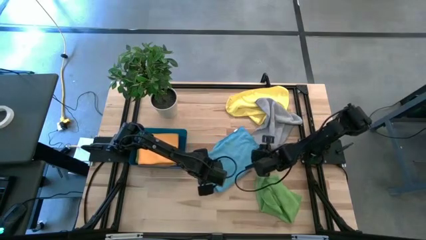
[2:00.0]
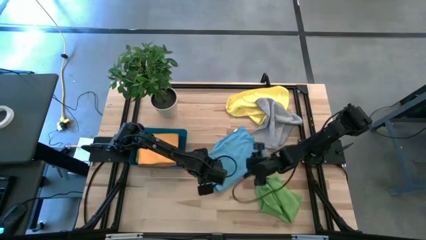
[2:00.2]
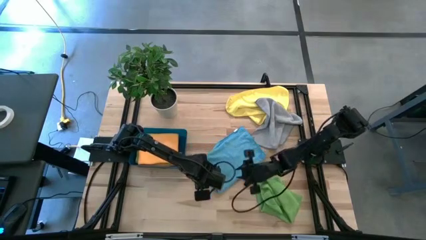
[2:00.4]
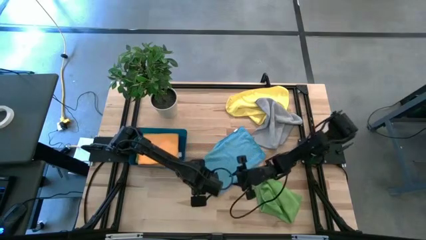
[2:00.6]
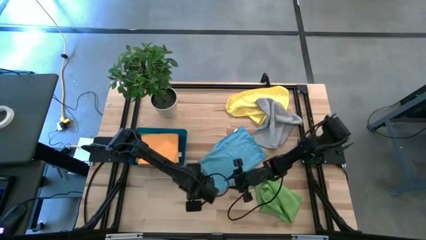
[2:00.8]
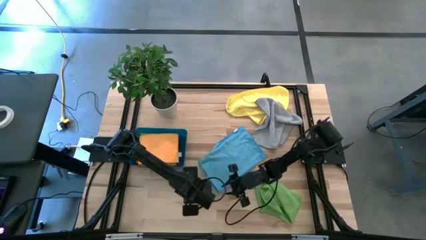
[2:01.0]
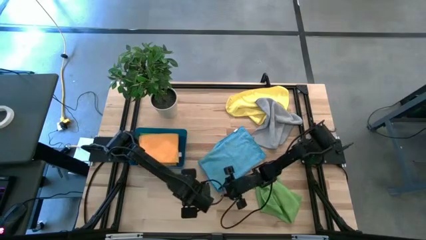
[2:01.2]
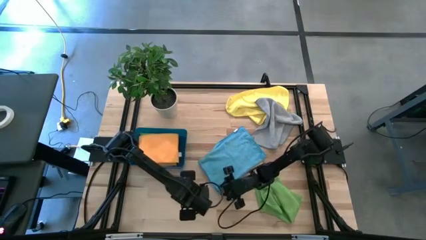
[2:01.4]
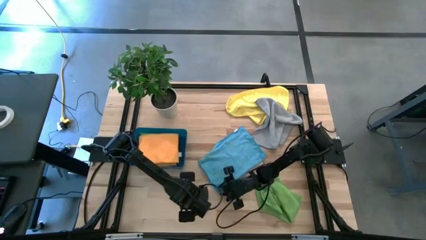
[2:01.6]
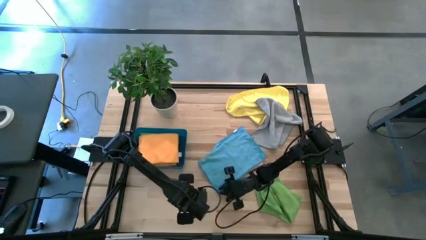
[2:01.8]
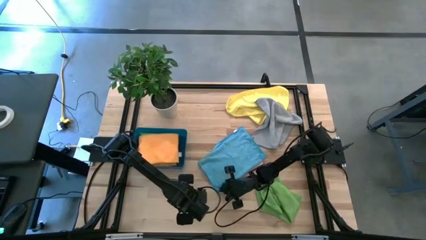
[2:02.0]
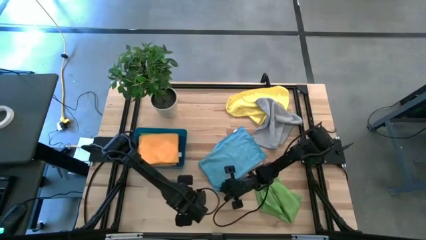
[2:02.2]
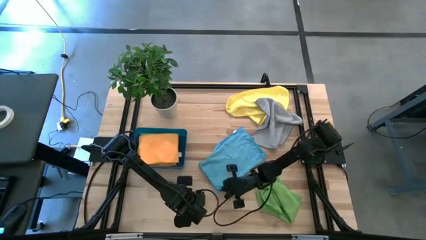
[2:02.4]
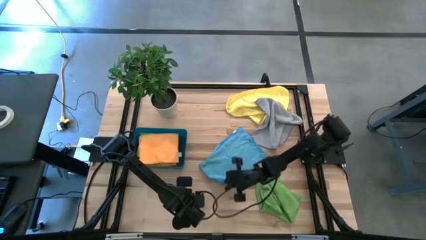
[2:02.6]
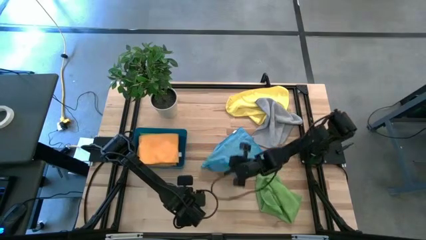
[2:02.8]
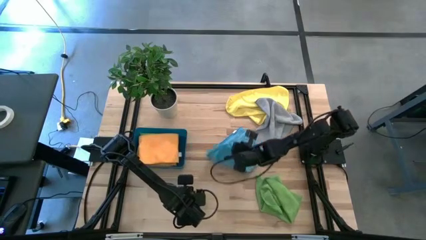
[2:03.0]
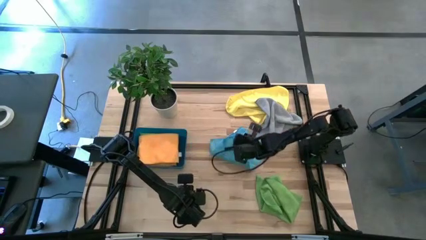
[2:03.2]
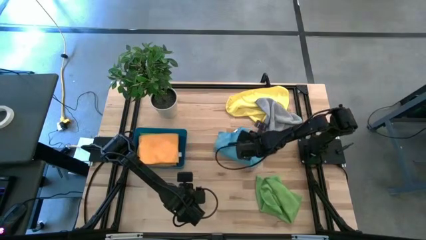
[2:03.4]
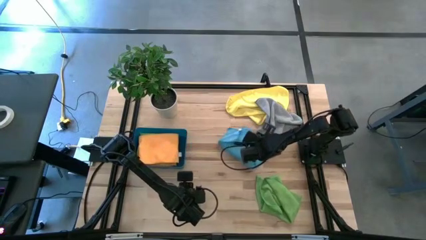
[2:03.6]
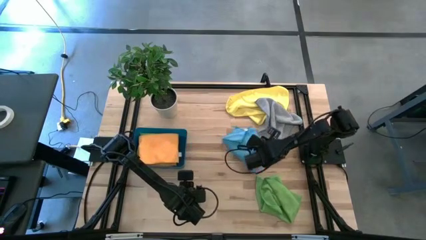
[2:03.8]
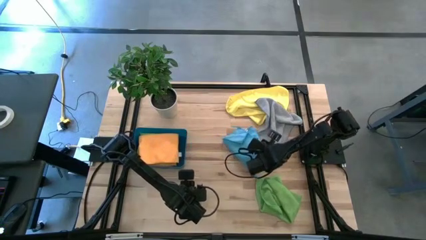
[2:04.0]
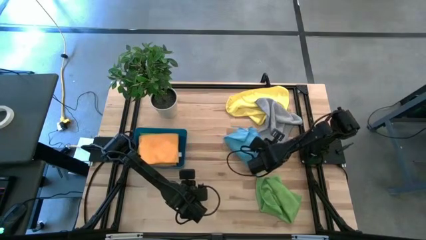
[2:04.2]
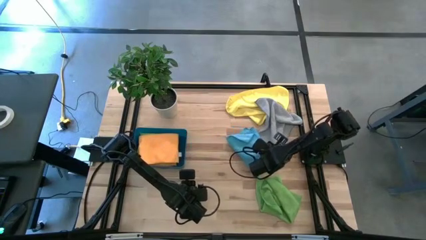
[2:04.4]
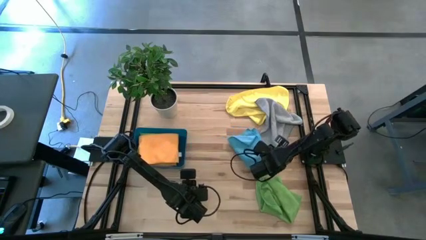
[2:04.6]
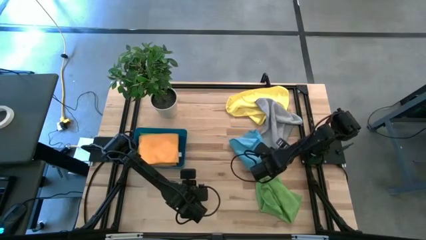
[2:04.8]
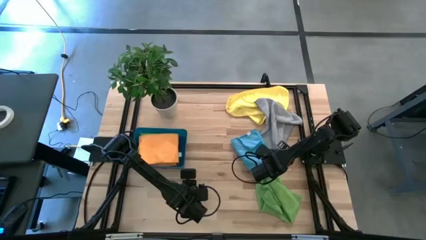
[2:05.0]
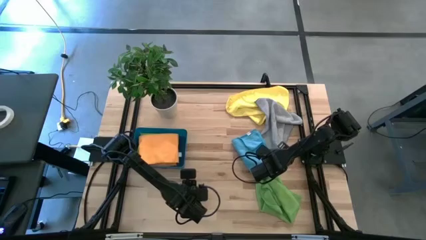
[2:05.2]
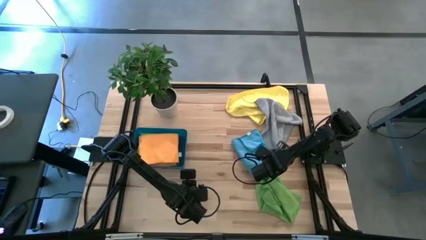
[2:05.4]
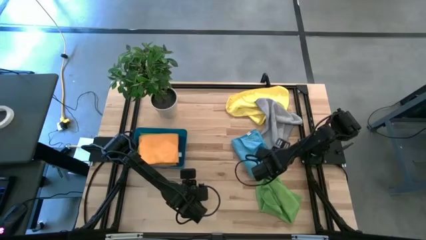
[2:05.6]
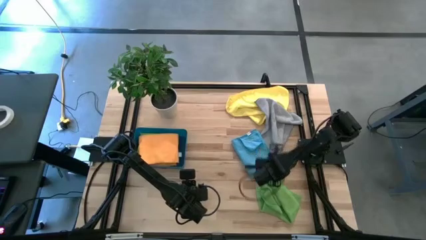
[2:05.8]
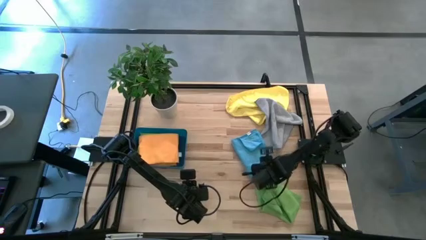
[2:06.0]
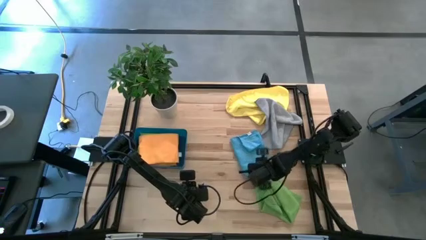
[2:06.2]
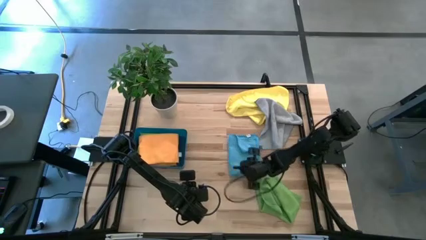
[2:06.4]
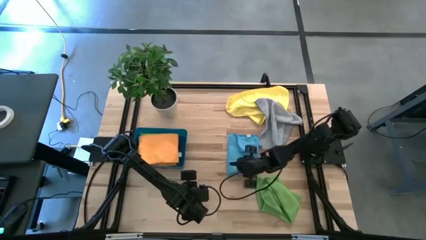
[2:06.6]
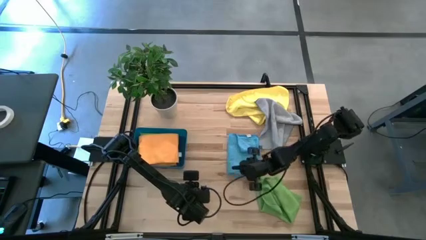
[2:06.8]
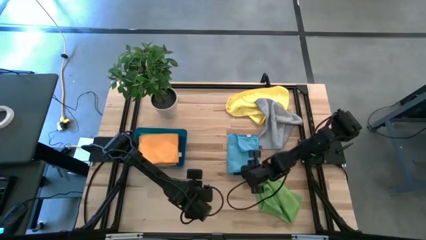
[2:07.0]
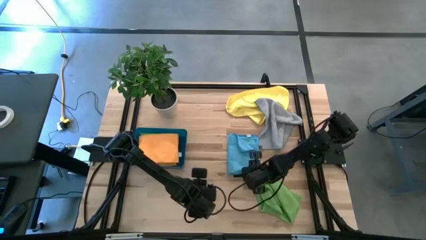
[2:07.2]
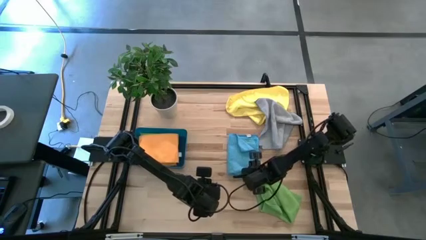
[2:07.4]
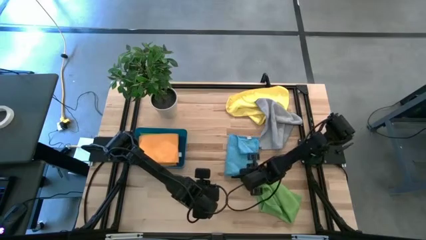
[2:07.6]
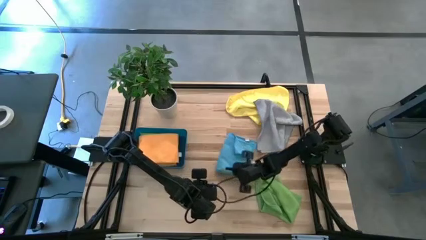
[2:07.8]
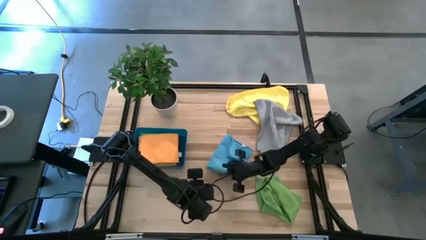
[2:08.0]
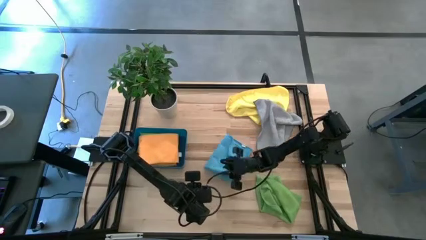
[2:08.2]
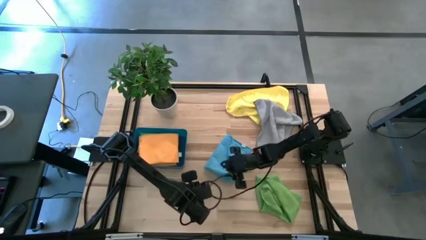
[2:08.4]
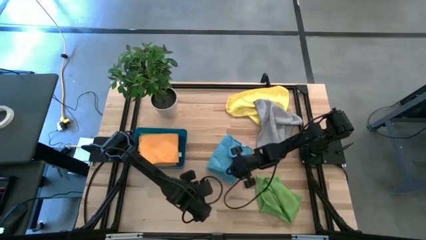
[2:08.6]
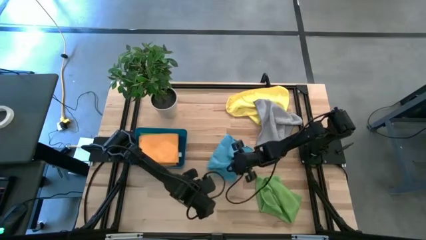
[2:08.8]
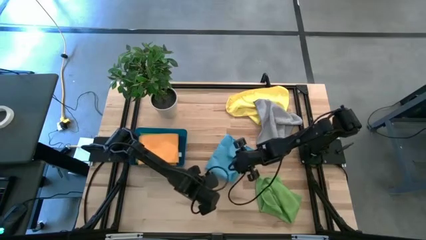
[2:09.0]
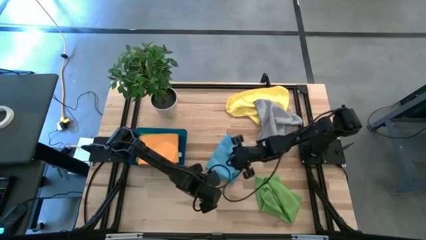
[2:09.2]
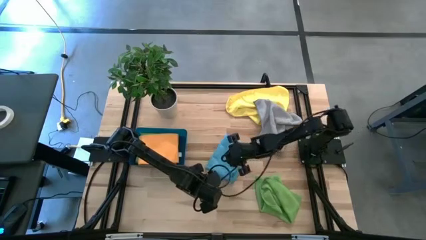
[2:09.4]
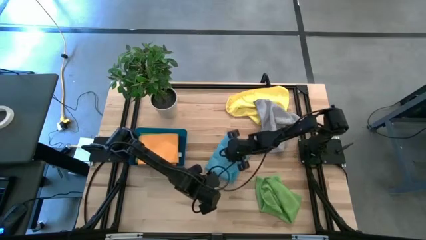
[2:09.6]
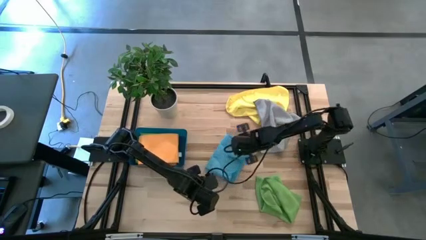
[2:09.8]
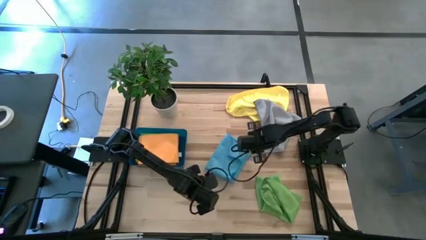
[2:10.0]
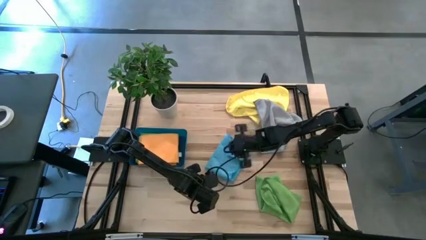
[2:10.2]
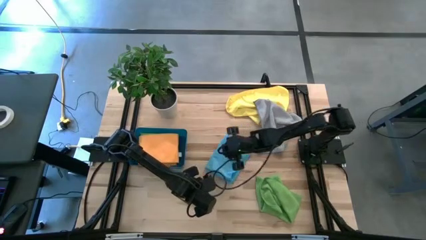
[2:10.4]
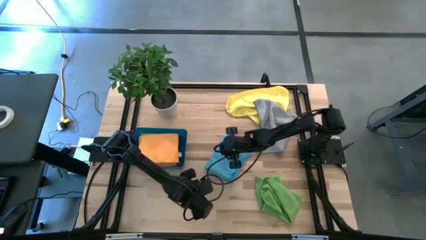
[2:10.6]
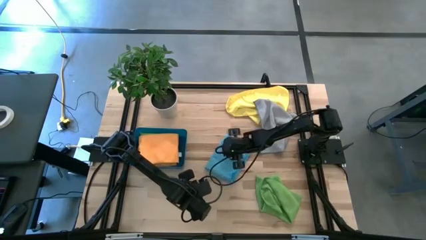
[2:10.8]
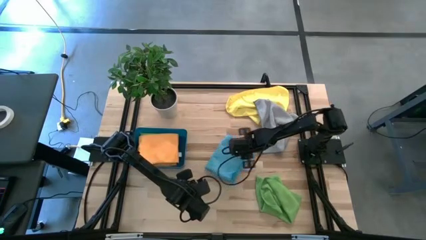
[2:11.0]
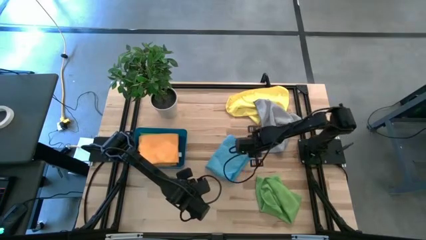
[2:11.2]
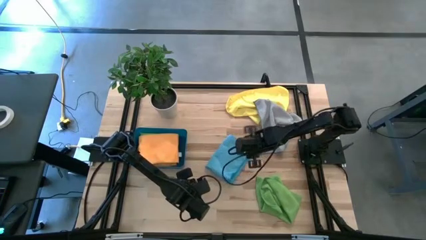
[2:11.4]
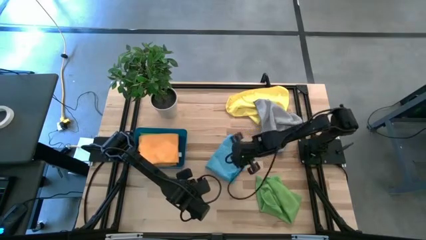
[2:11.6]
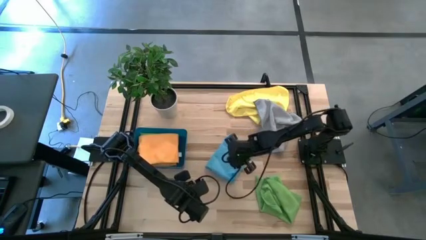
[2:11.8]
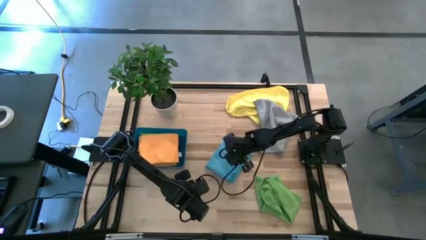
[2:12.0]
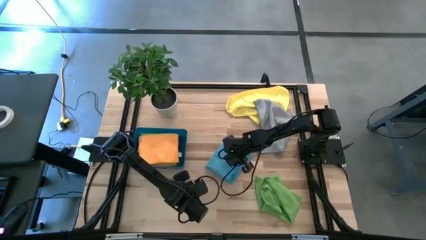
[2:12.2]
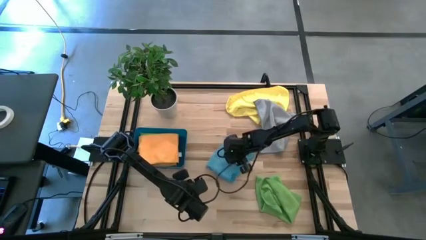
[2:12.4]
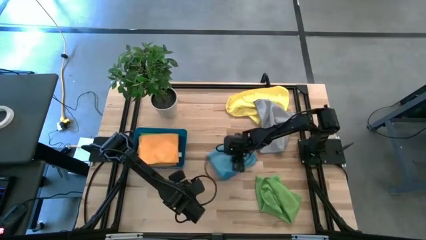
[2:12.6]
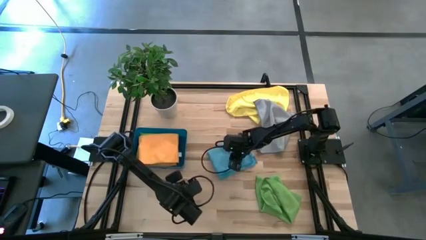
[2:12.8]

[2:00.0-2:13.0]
Task: Fold microfiber towels
Fold the blue microfiber towel on the table
